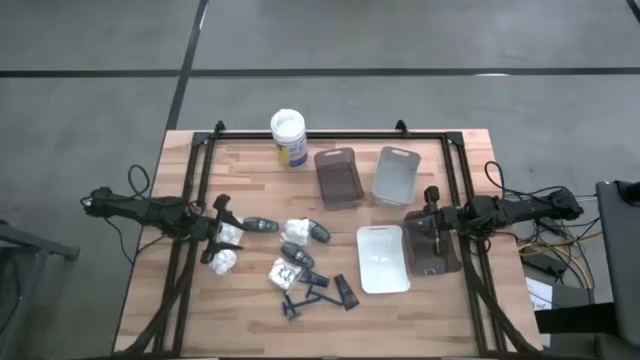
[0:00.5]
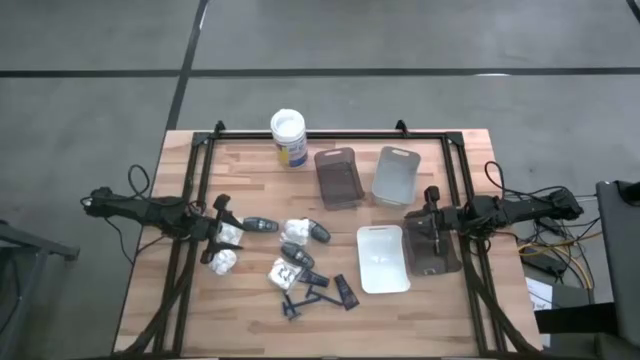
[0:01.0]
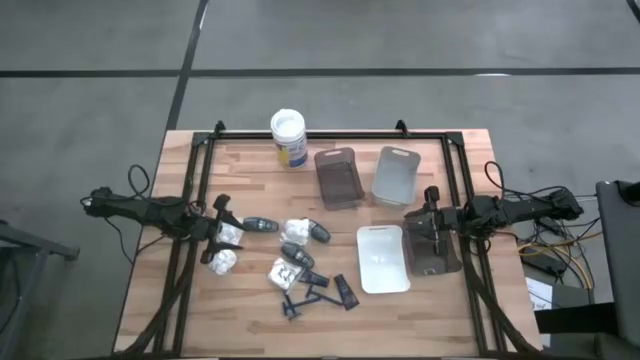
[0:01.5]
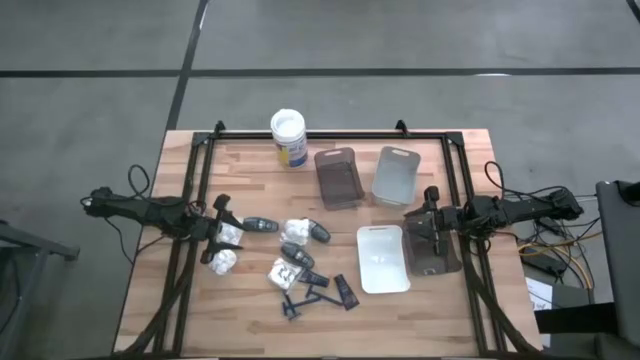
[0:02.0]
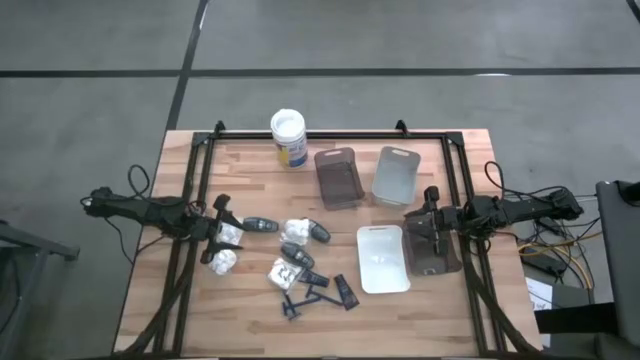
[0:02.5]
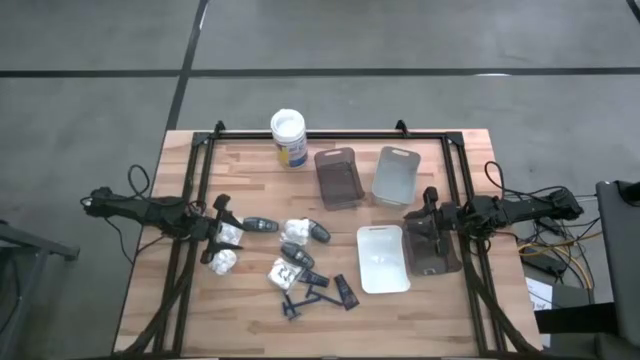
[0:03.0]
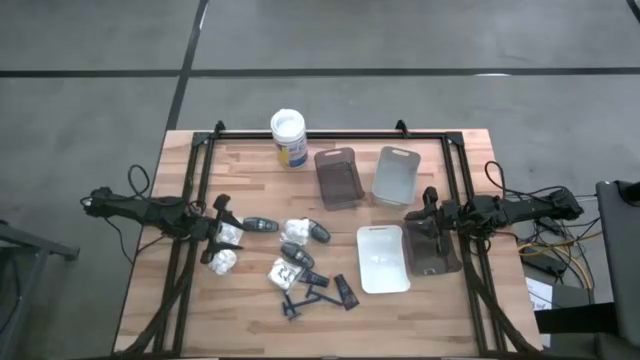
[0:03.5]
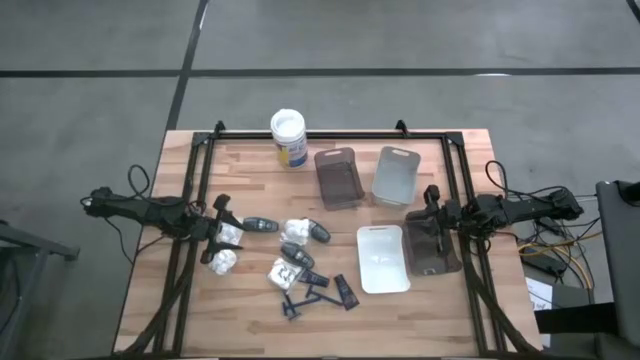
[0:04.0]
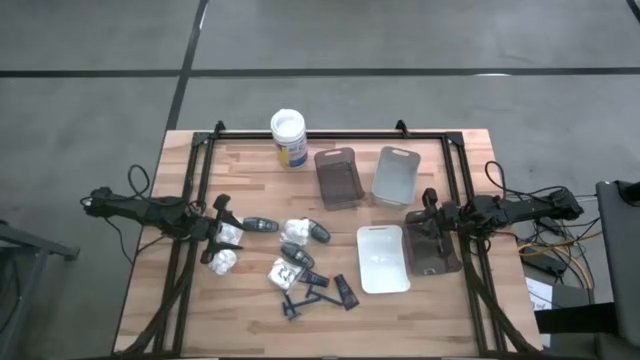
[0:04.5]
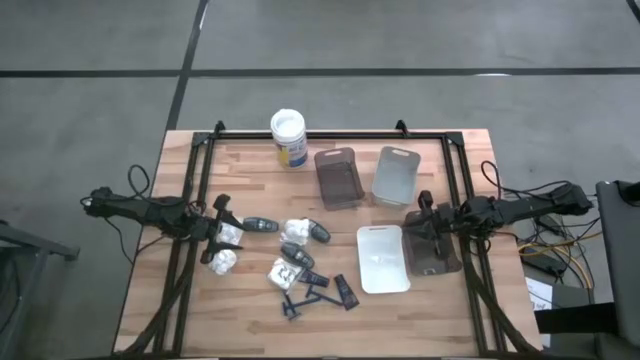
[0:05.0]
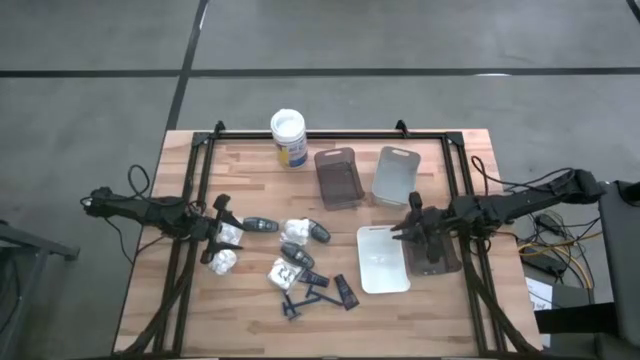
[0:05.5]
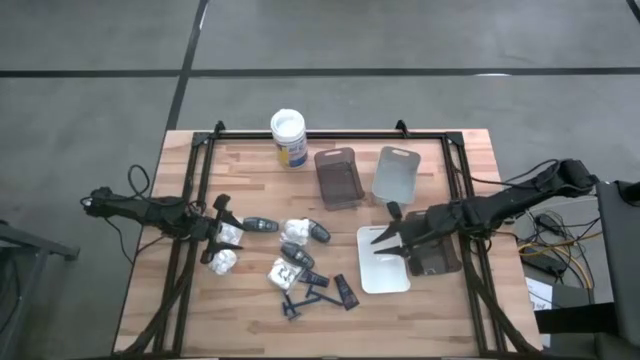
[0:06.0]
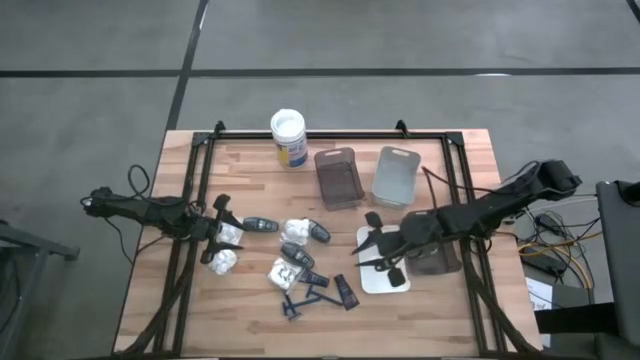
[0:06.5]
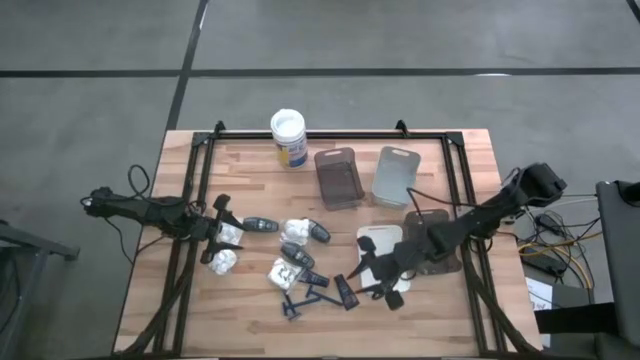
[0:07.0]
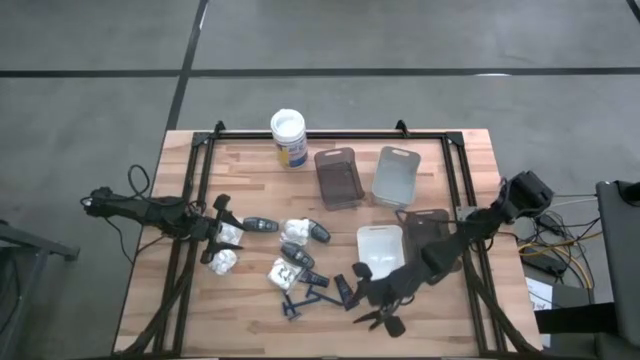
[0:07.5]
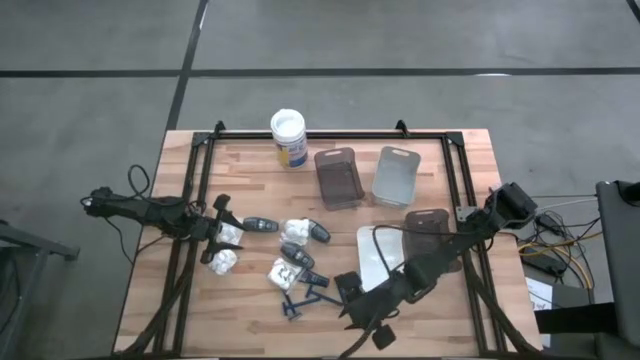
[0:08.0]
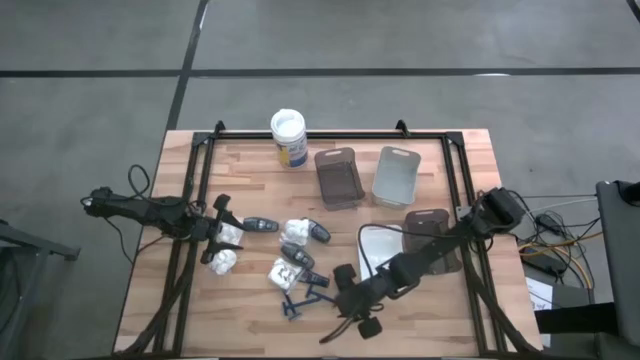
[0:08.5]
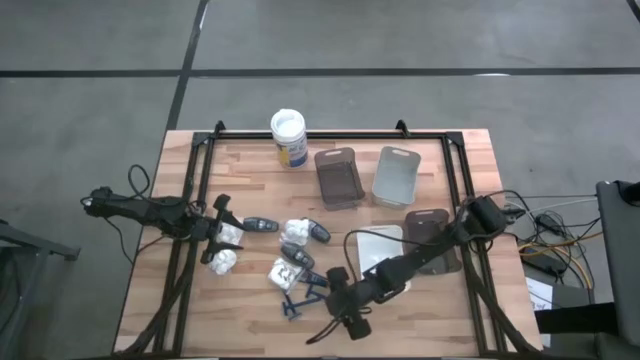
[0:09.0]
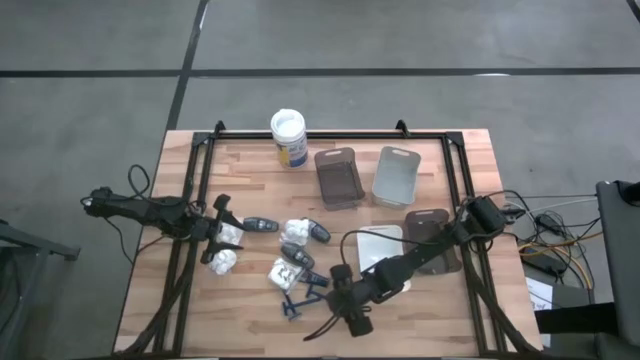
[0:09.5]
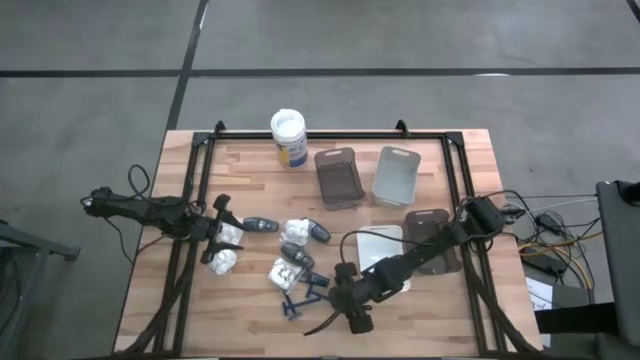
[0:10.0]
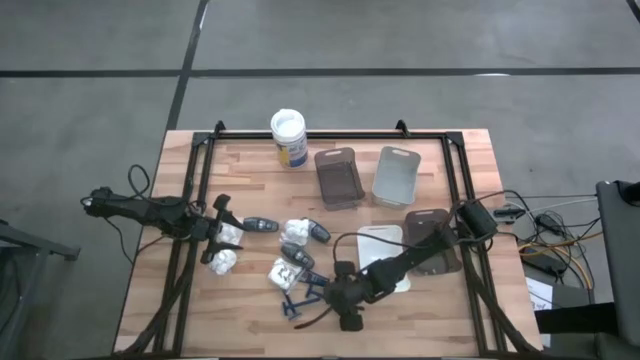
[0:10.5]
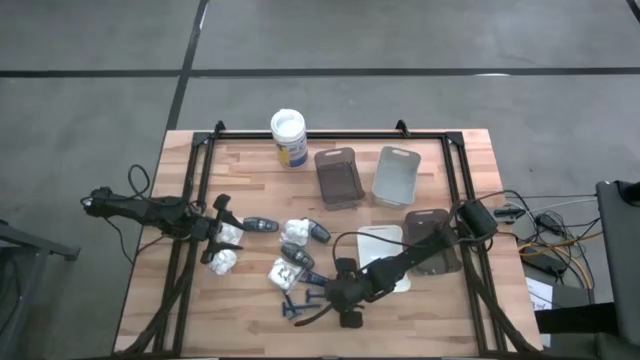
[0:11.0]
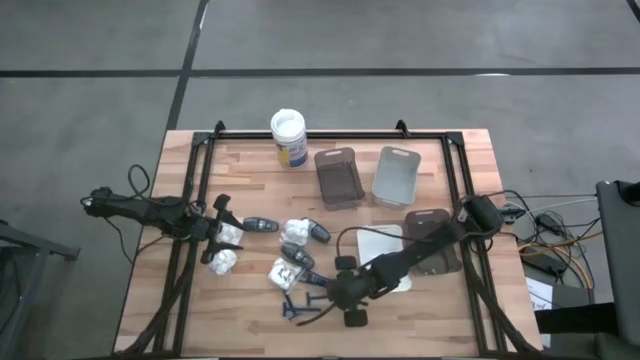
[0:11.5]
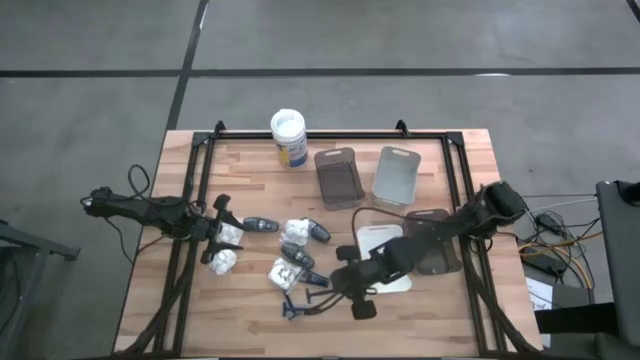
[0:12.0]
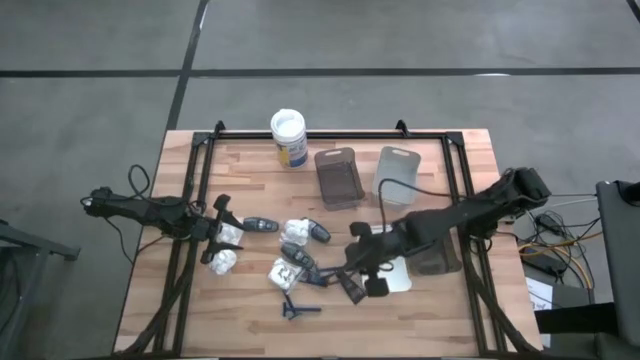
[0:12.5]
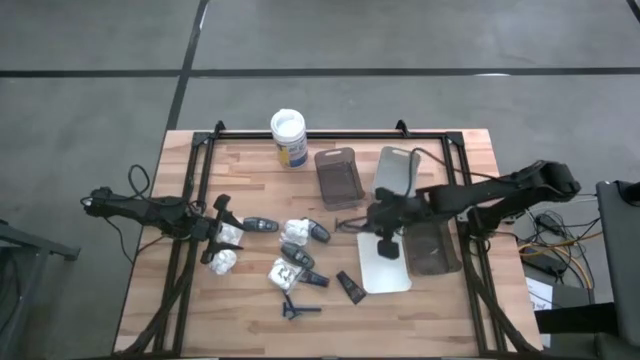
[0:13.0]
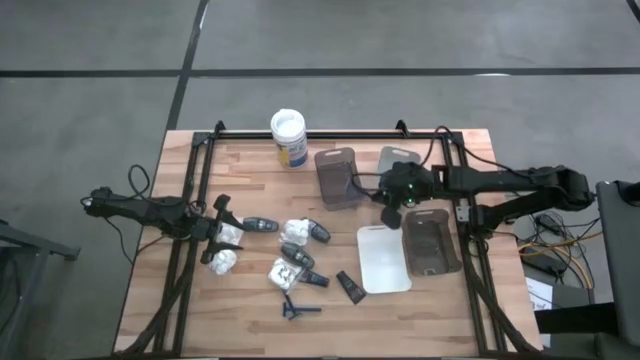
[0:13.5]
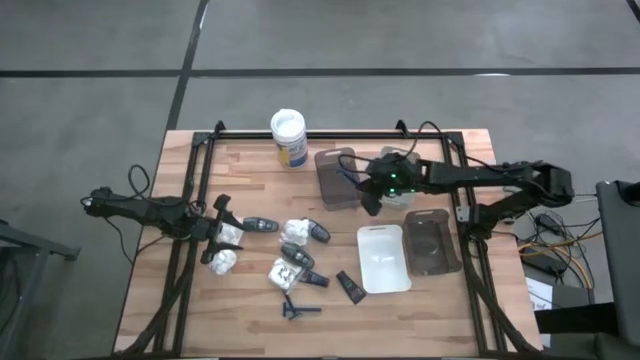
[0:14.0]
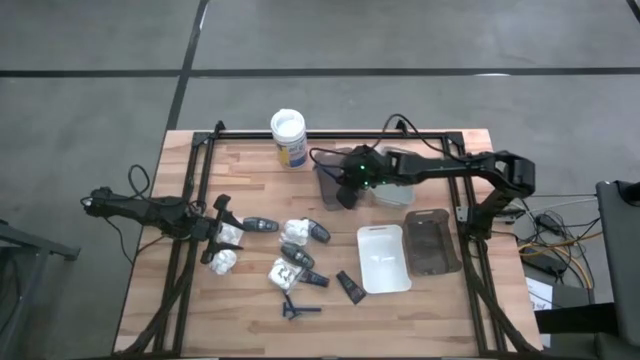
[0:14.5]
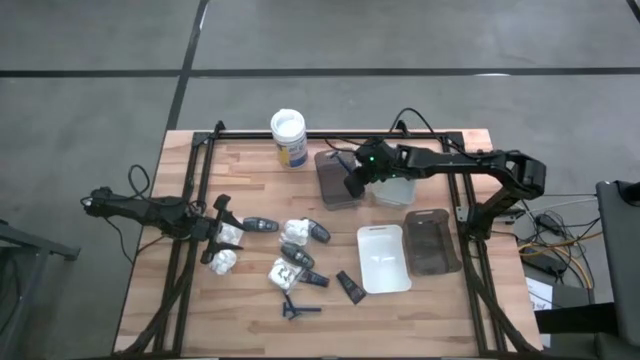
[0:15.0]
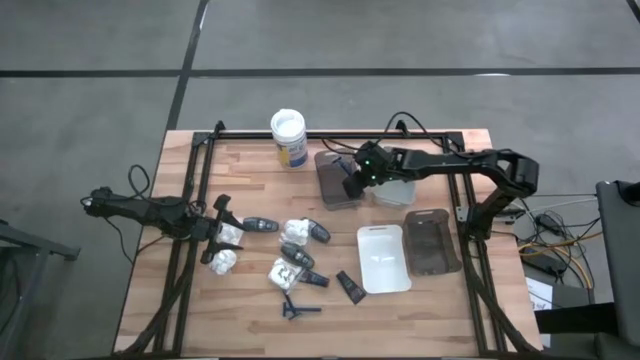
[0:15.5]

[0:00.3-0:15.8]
Task: Pick & Place Travel size toiletries
Put the blue razor into the top black bin

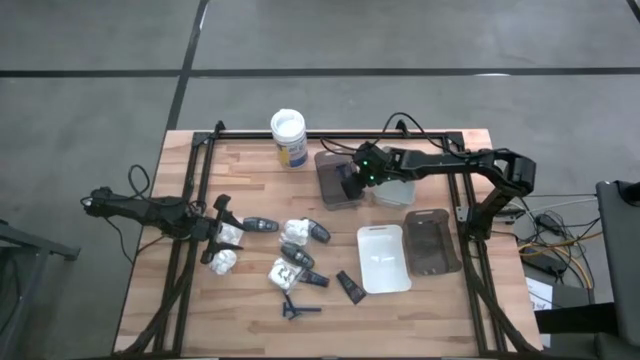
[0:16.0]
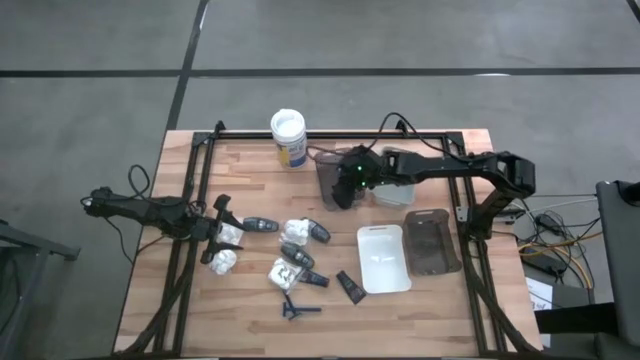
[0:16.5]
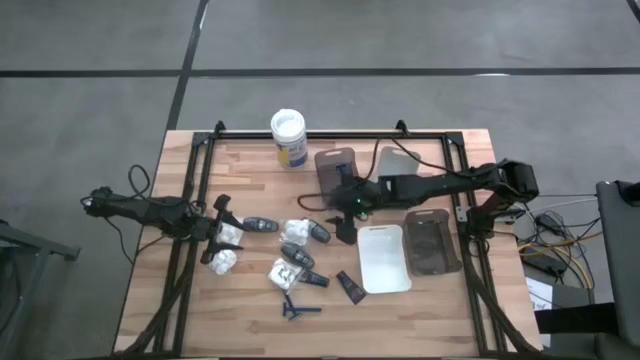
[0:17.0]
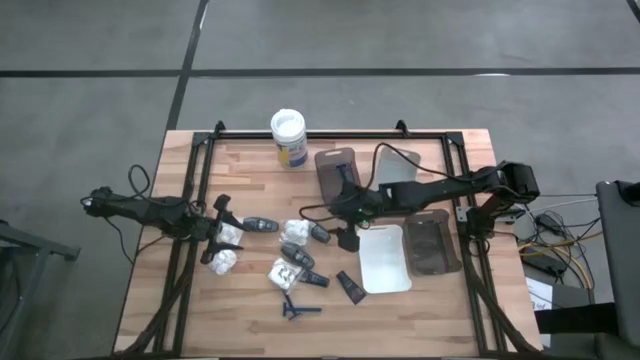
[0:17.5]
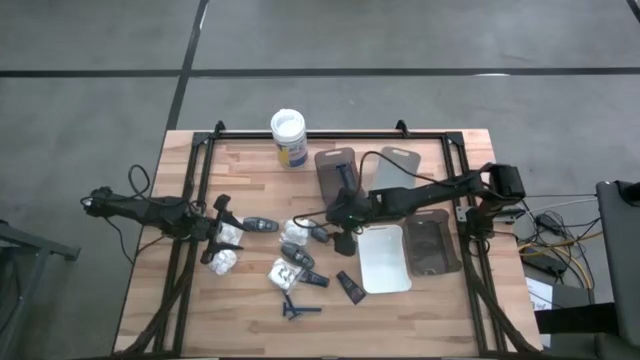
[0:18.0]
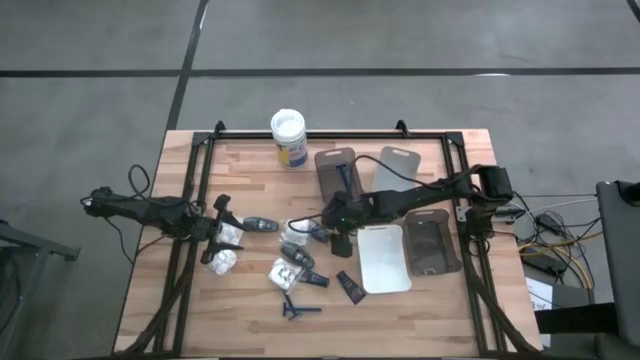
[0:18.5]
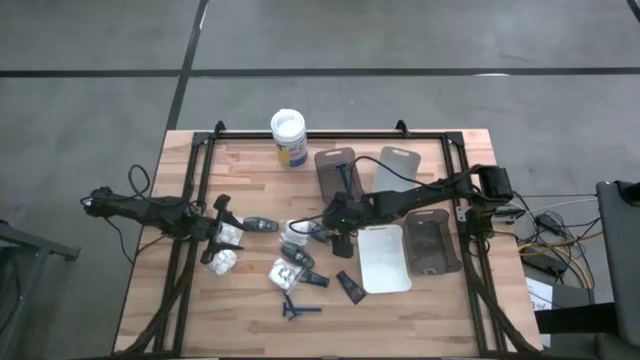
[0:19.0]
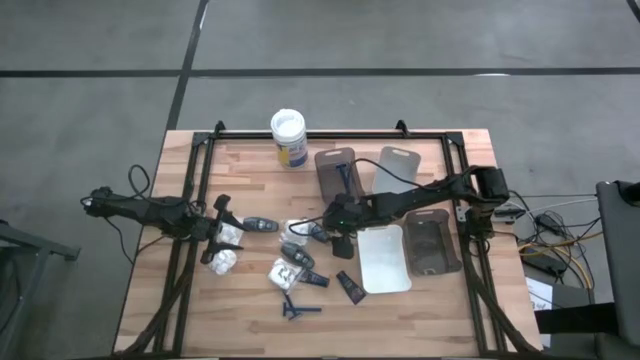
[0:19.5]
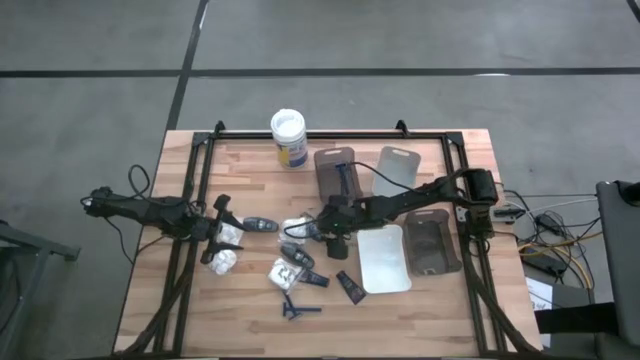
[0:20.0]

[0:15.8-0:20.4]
Put the gray deodorant into the gray bin

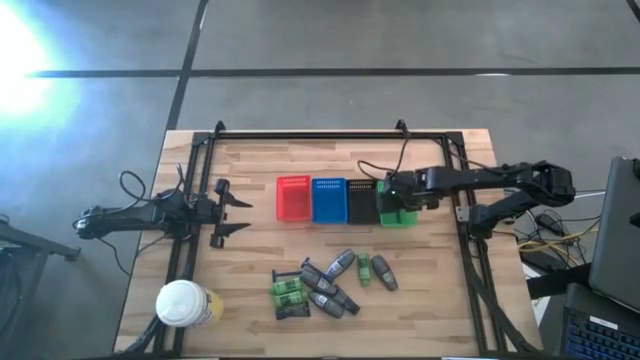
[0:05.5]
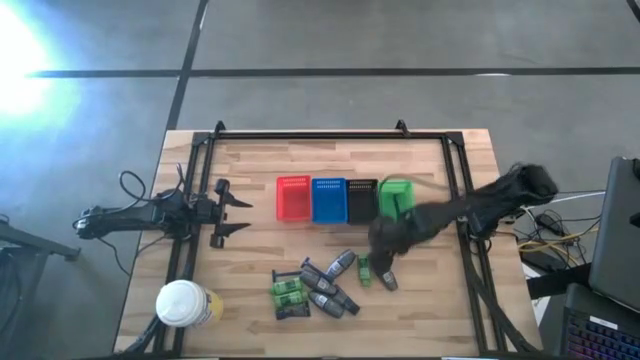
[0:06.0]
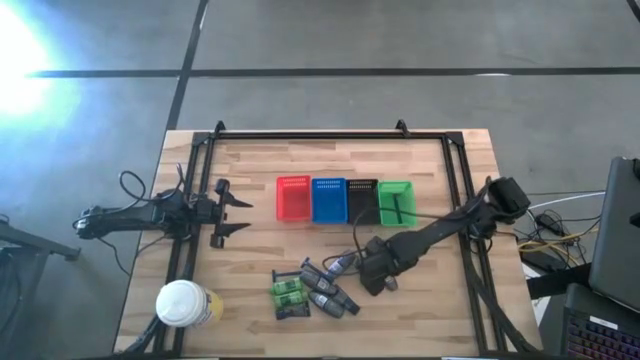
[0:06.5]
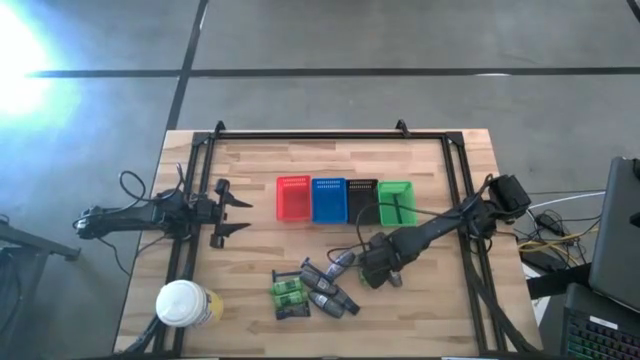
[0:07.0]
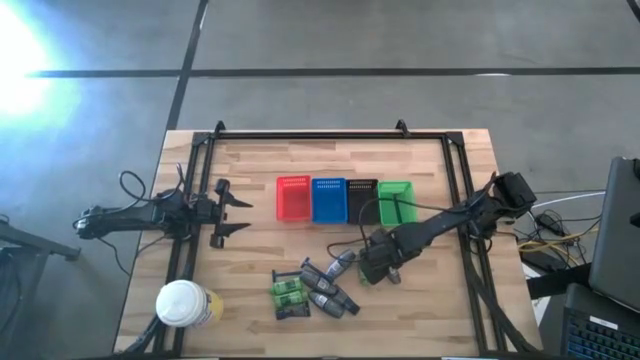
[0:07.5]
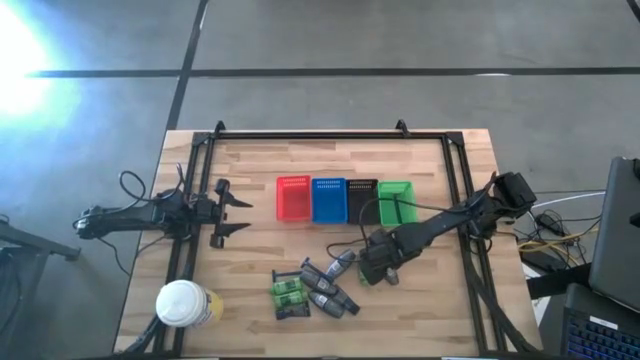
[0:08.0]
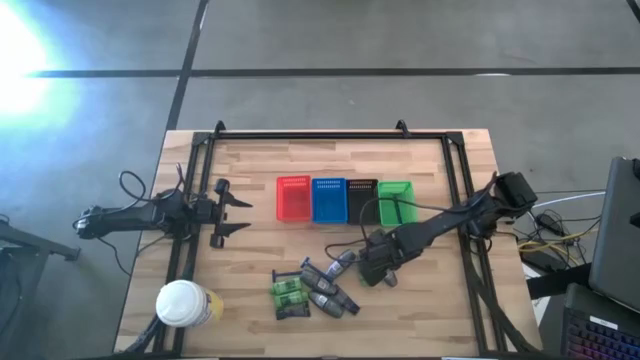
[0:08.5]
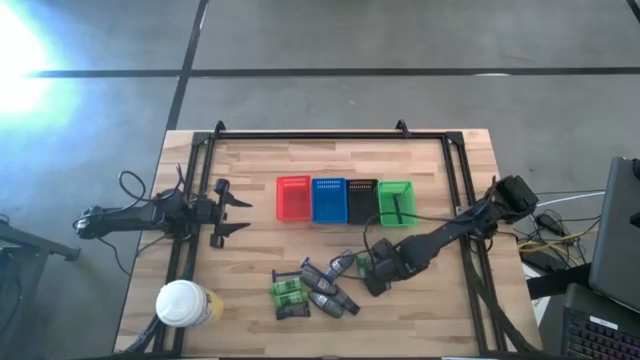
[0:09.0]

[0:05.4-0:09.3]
Task: Pick & Place Travel size toiletries
Put the gray deodorant into the red bin
